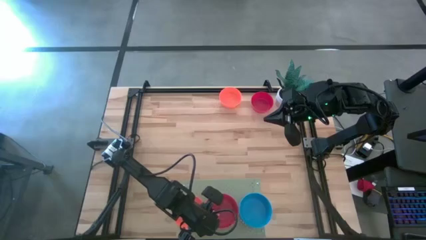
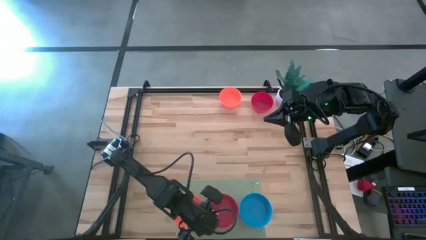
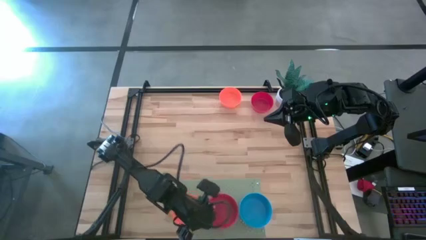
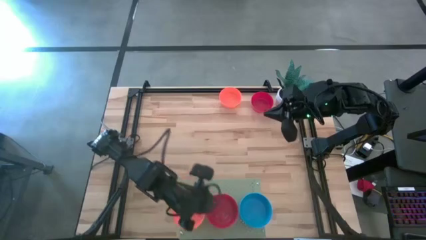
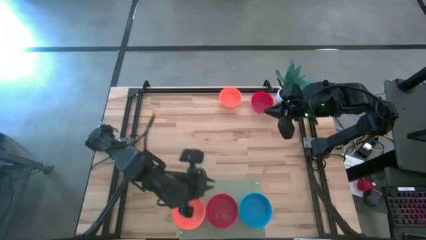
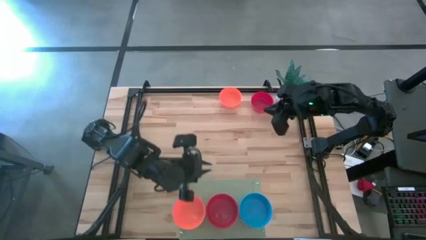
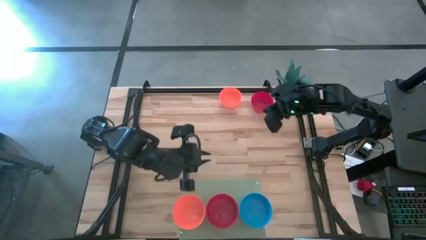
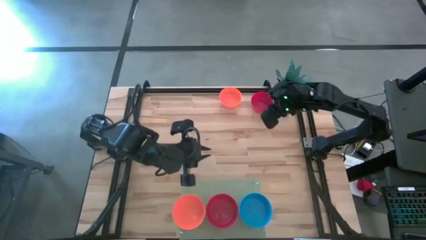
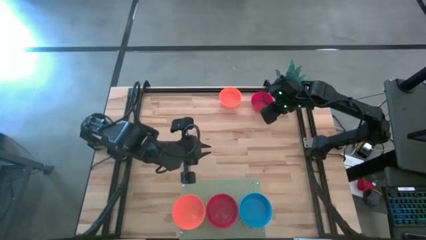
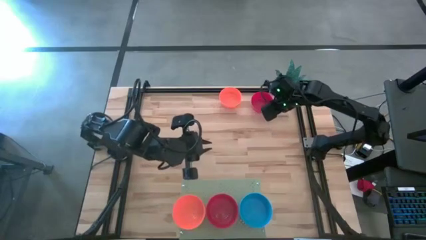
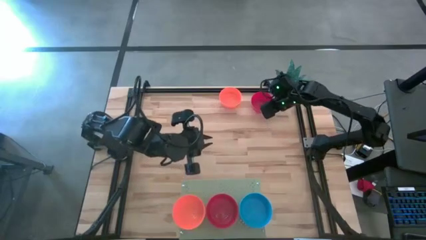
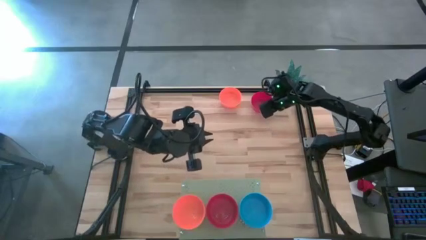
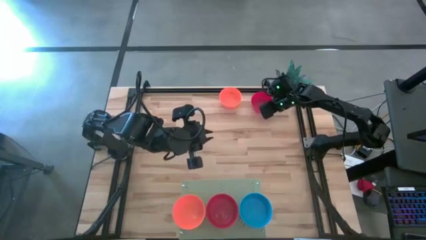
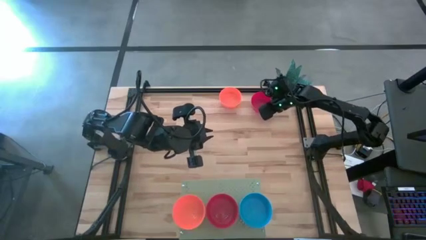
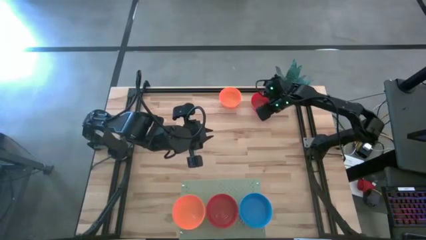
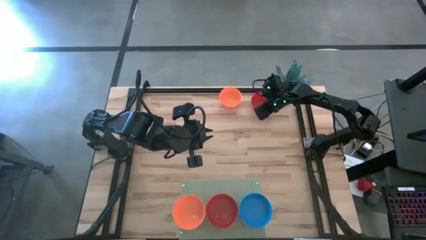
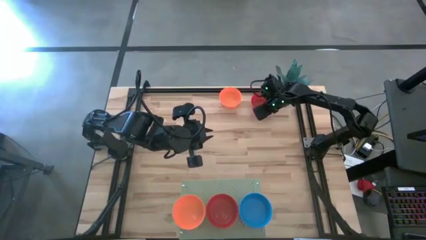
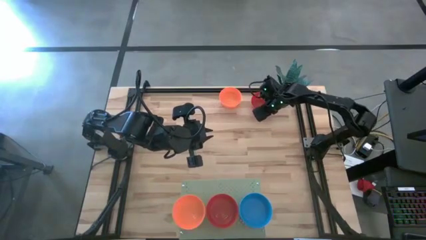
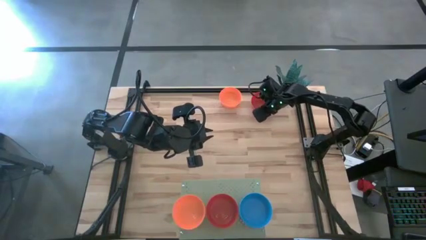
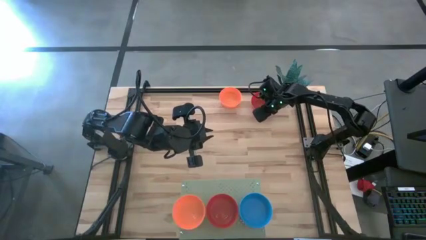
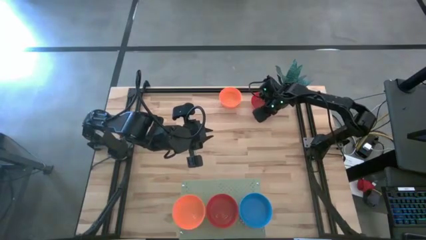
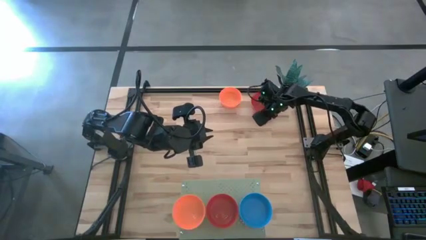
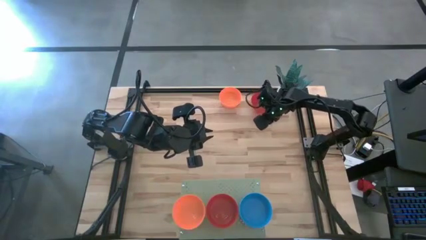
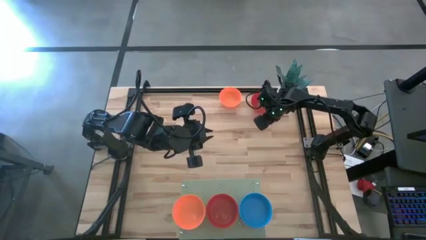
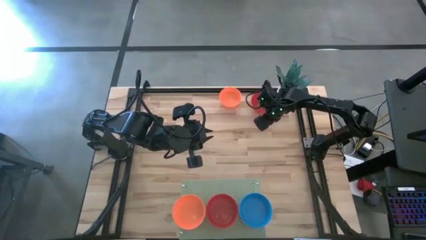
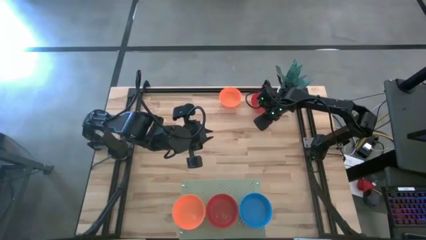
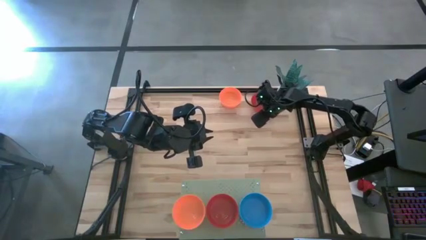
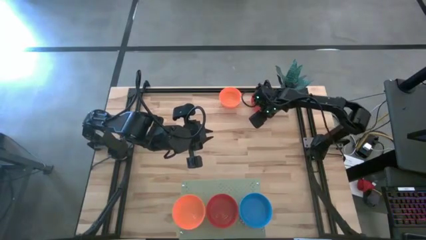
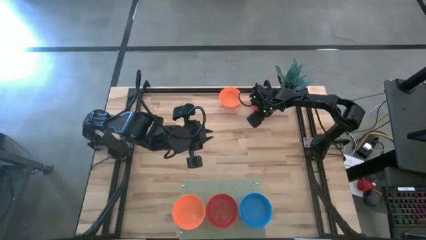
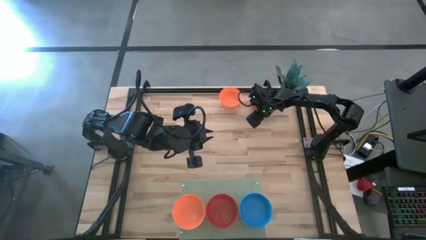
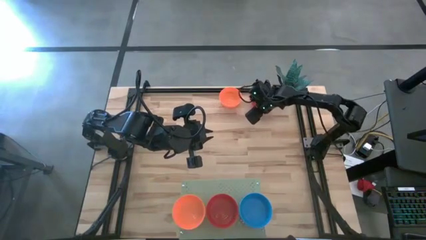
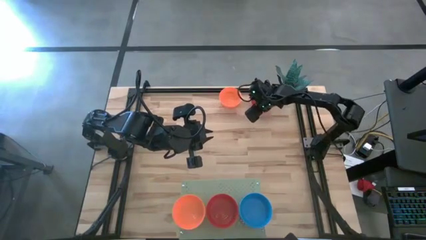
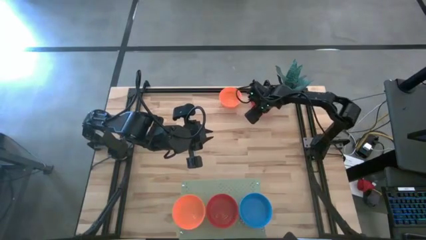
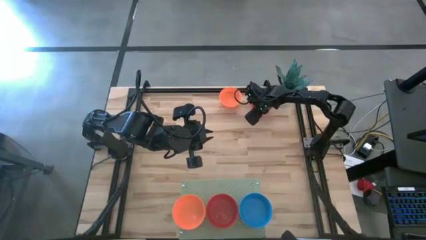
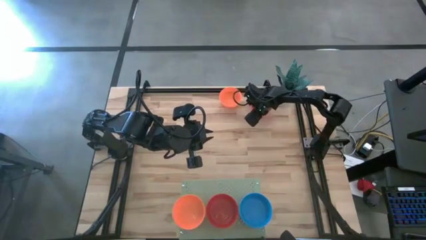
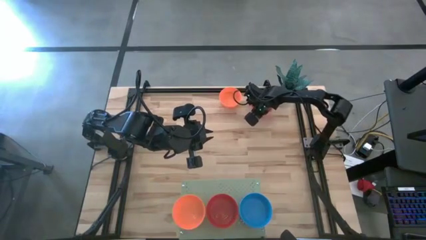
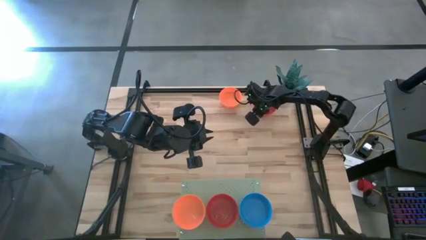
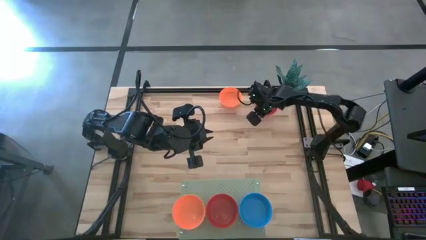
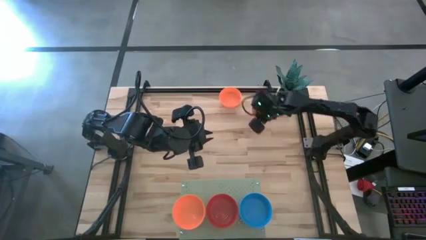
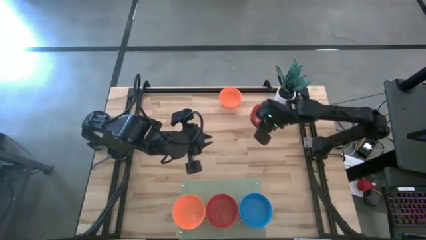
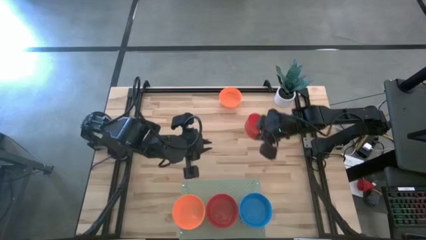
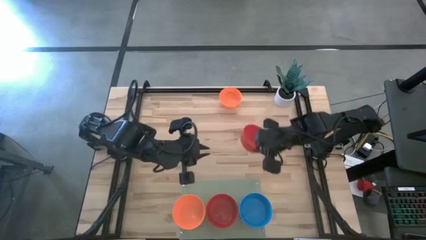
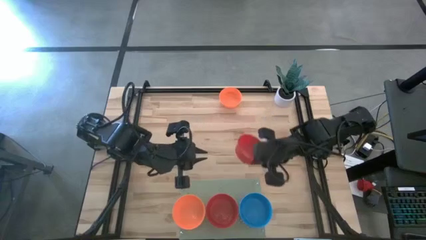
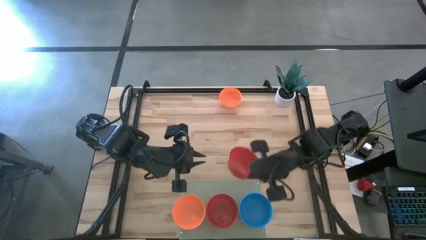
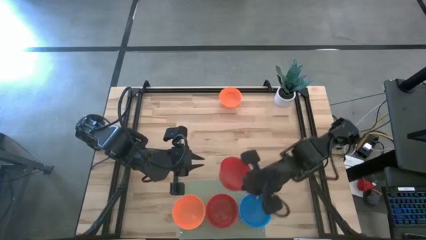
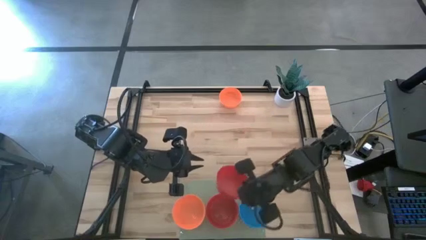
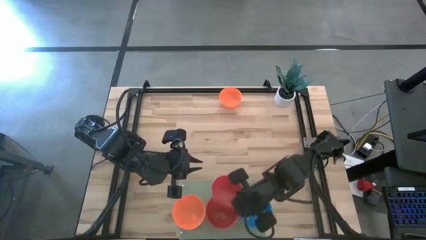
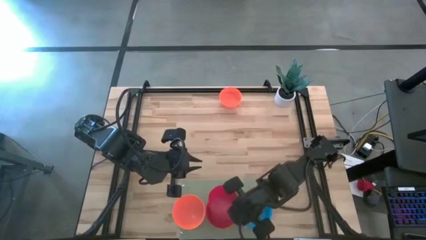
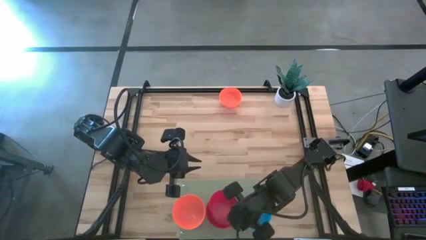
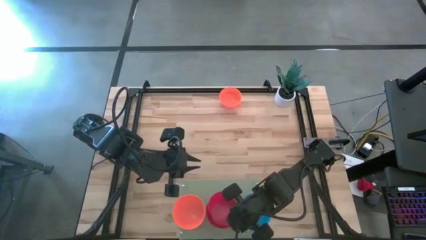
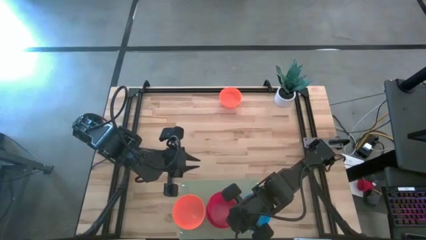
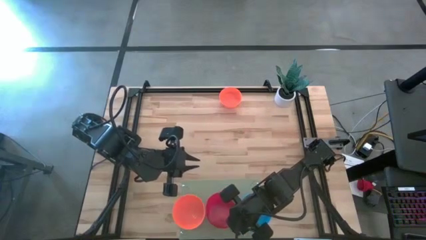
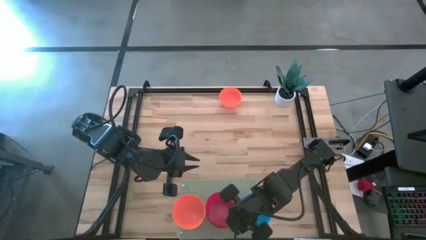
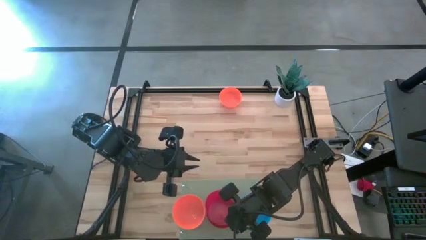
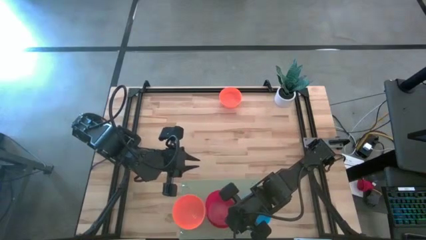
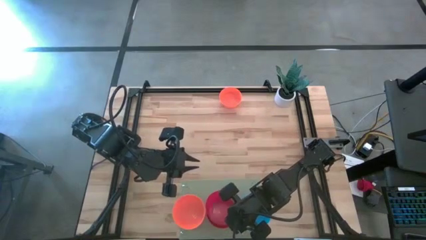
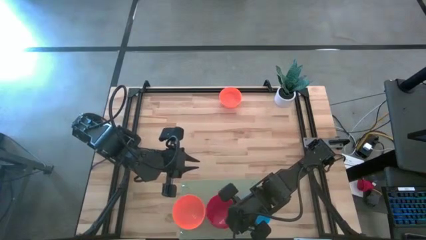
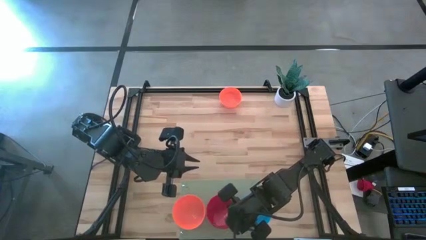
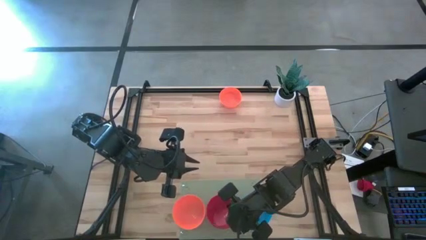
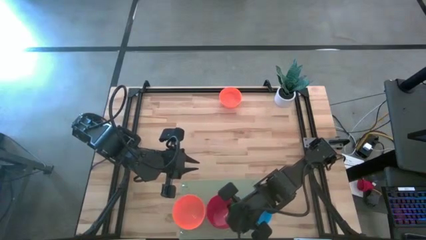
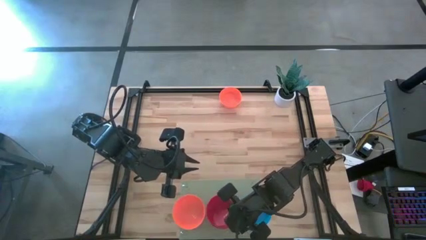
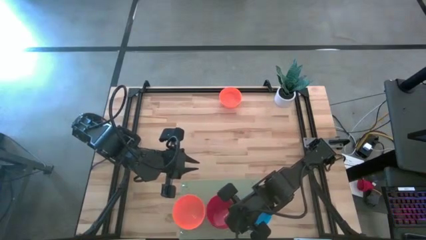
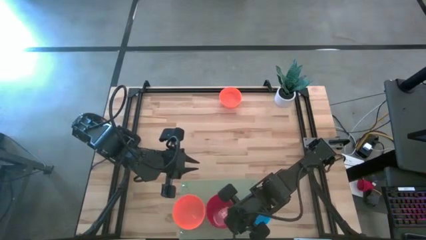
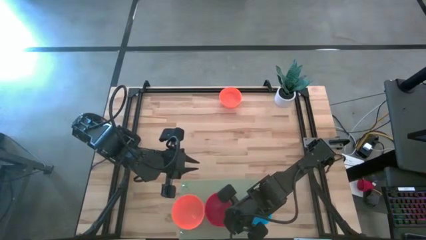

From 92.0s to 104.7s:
Task: Pick & Place Mini bowls
Stack the red bowl on the red bowl on the shelf
